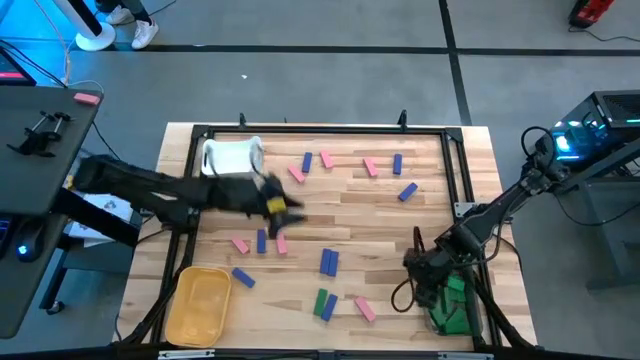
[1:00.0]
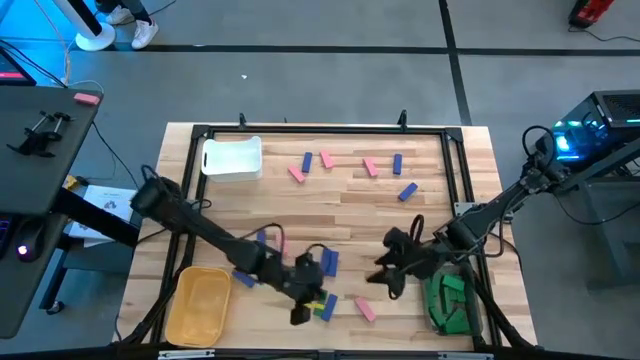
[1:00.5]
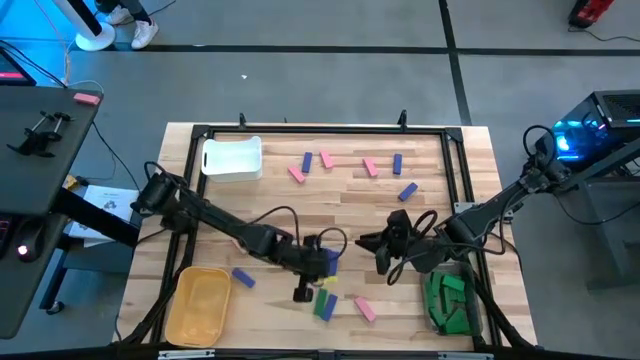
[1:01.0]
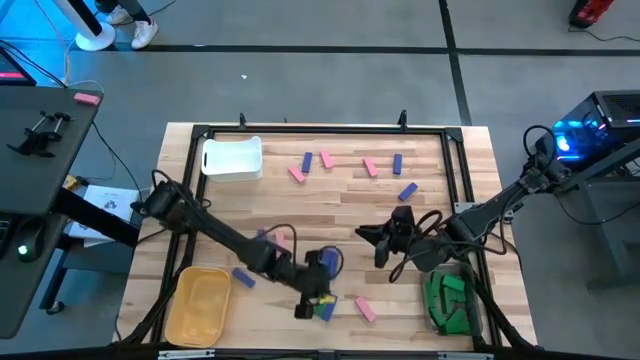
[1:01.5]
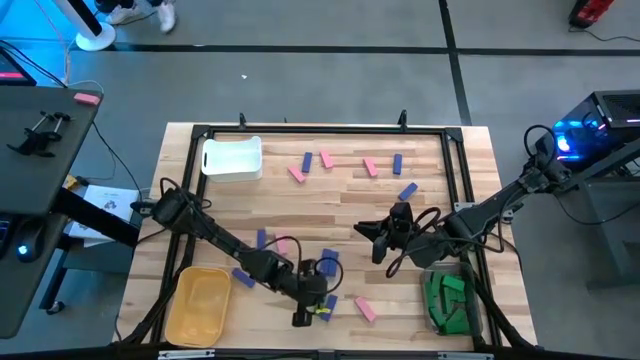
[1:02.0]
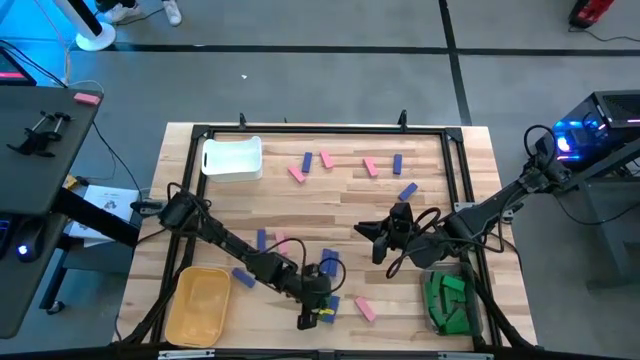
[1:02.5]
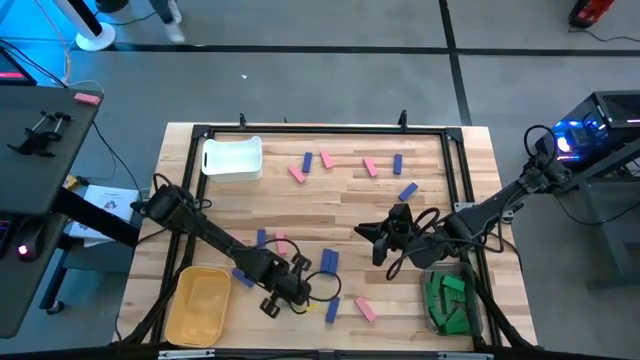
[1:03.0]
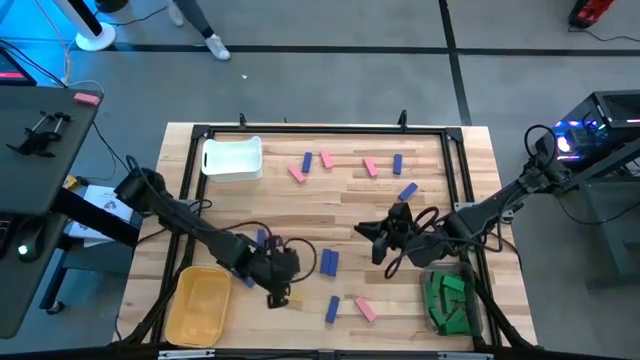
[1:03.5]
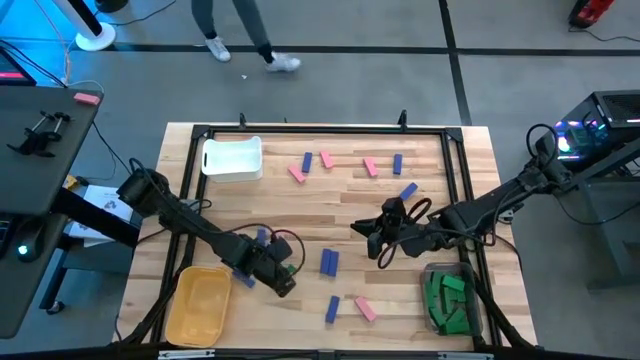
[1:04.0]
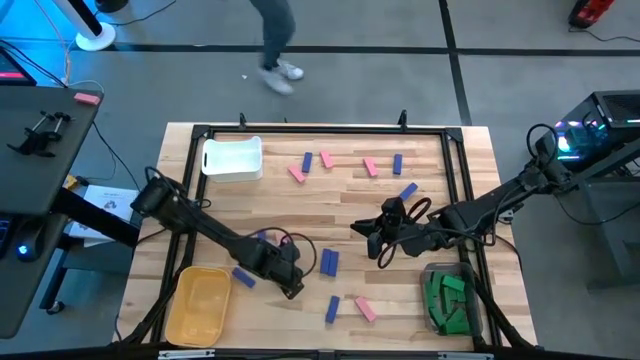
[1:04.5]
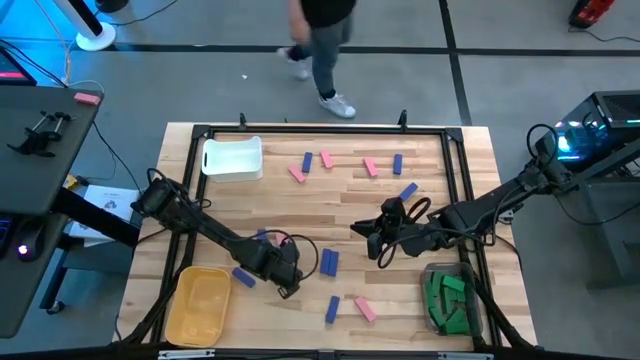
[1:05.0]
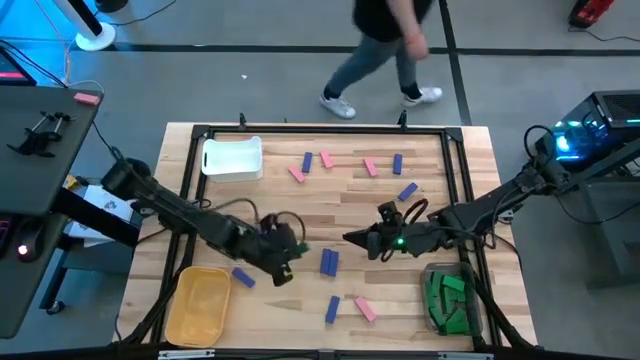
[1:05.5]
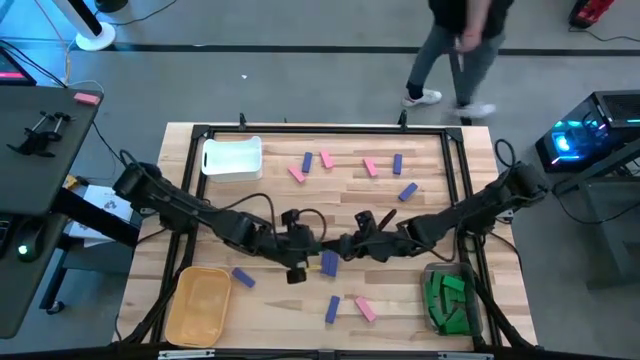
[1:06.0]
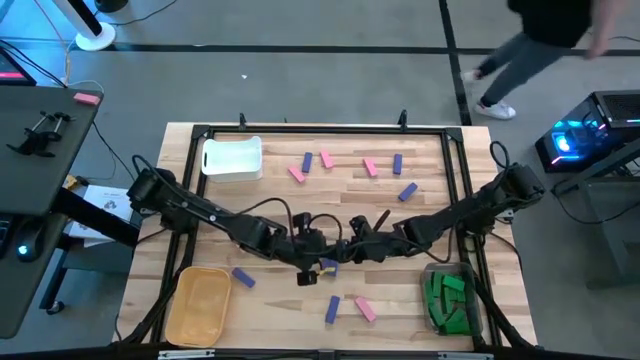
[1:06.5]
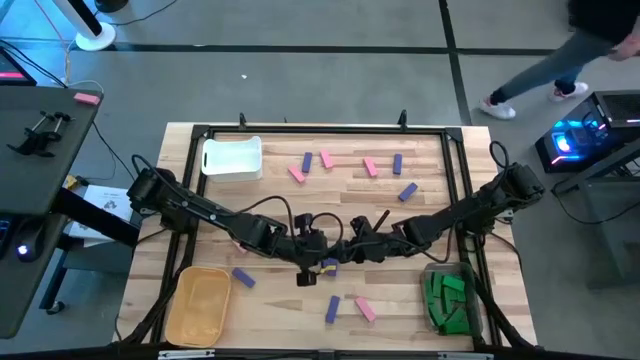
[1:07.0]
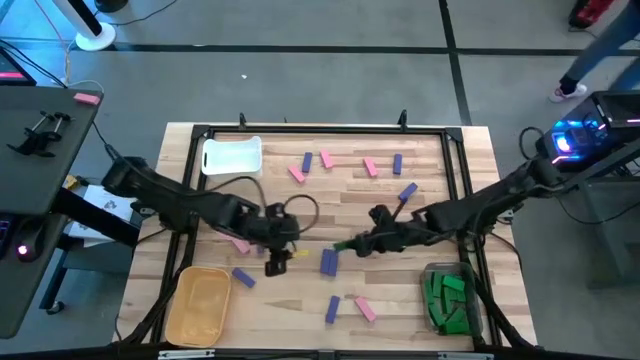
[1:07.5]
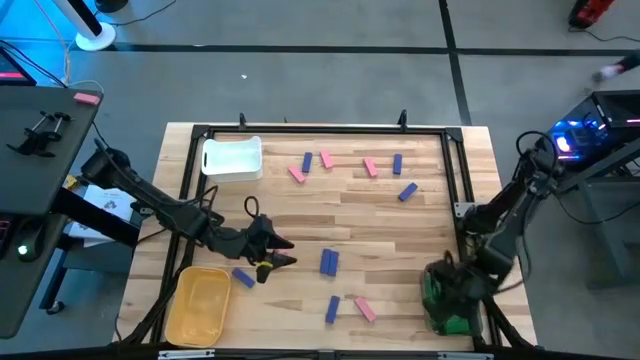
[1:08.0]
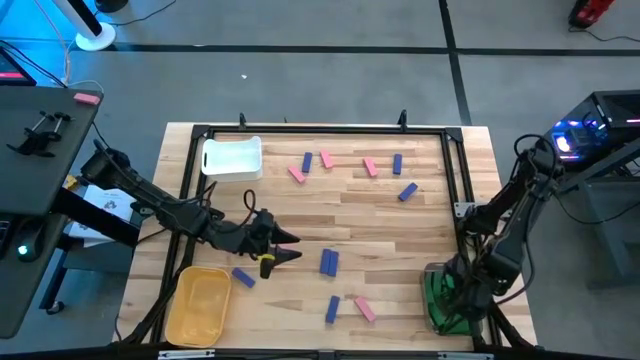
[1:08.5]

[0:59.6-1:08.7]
Task: Sort blocks
Put the blue block into the yellow bin

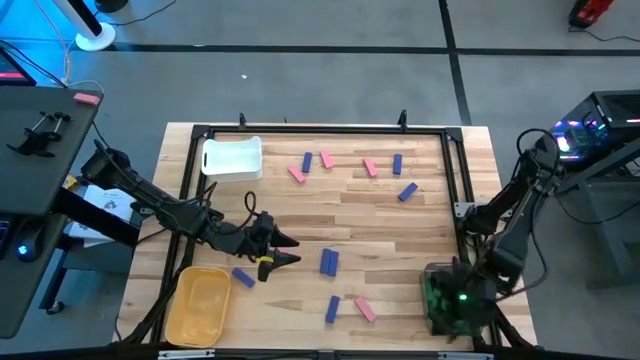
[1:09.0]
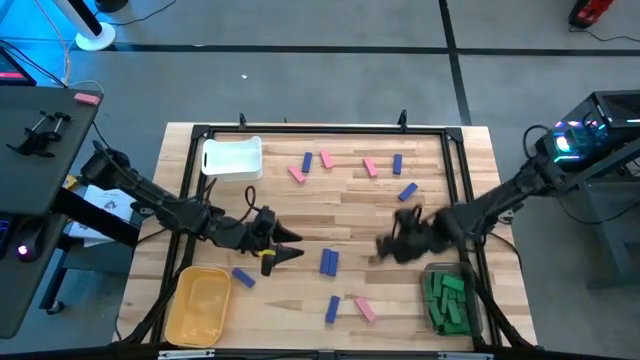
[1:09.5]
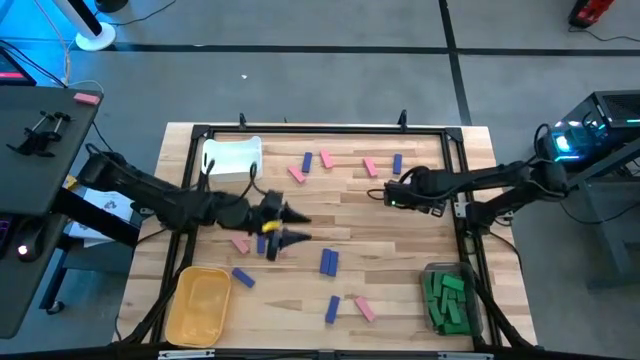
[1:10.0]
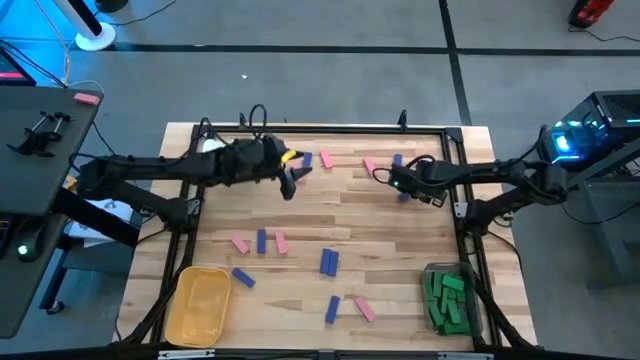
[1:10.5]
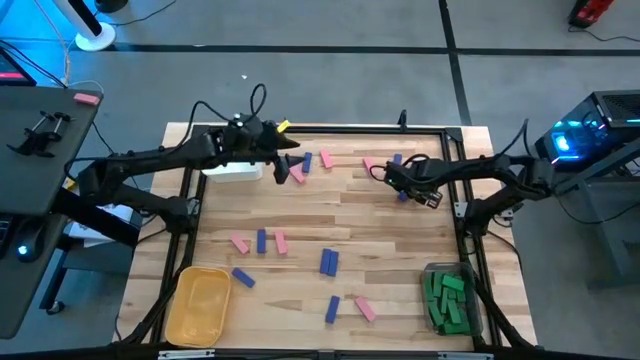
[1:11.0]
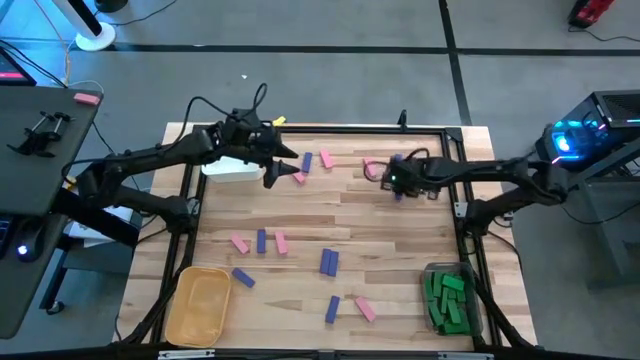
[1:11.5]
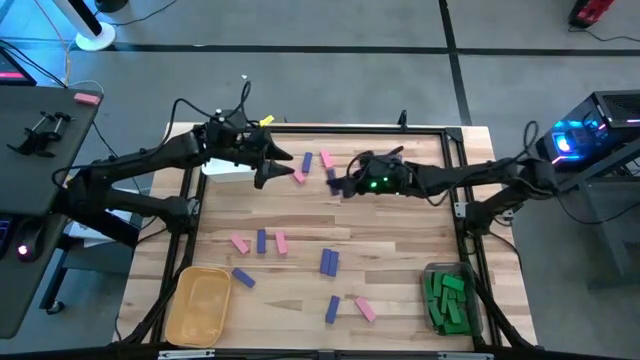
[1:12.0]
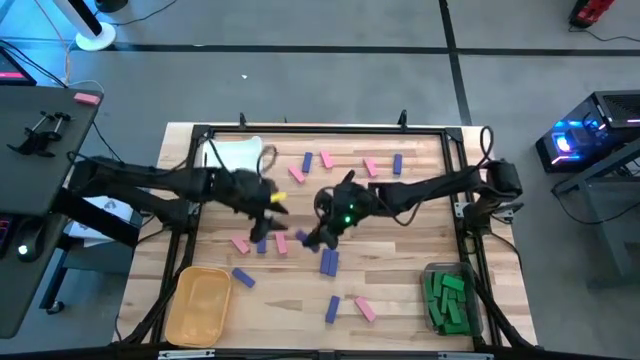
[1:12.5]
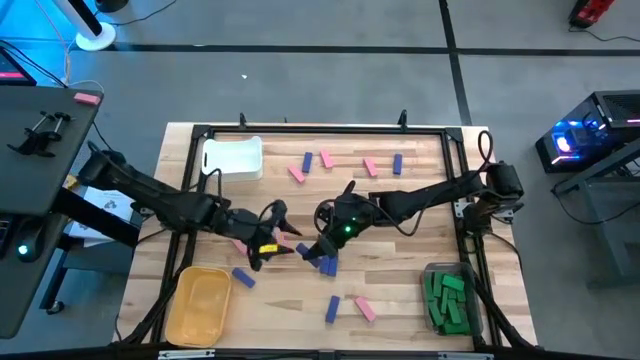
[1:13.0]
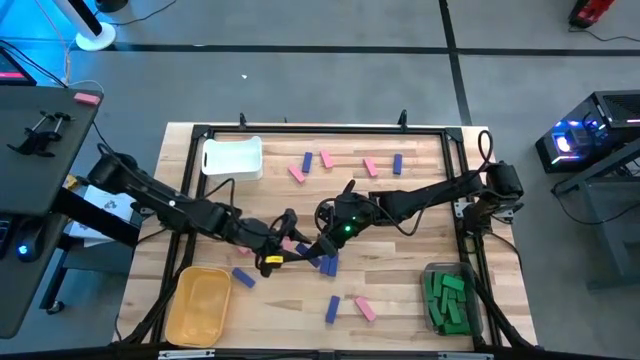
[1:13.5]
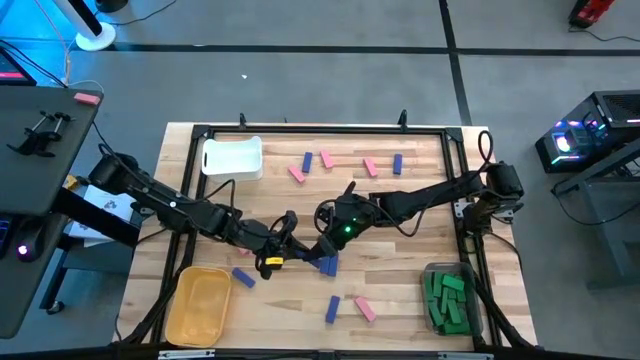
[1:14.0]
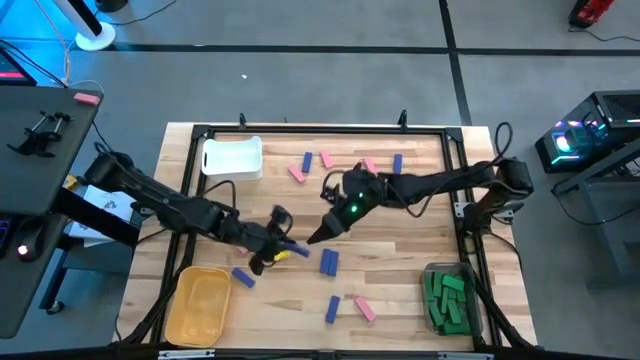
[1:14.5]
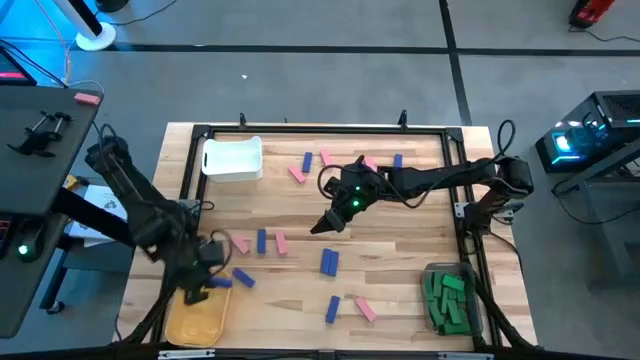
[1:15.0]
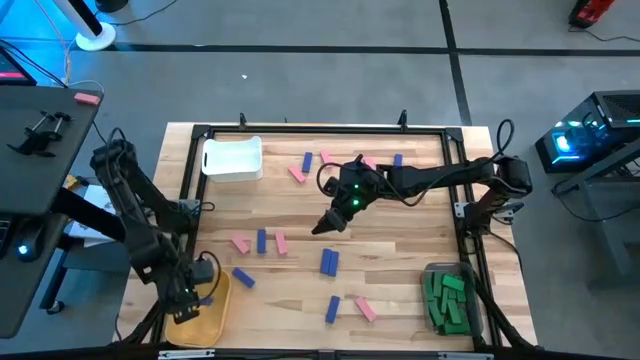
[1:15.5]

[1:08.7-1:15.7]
Put the purple block into the yellow bin

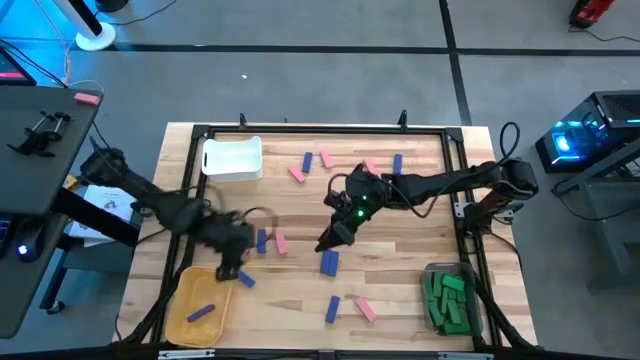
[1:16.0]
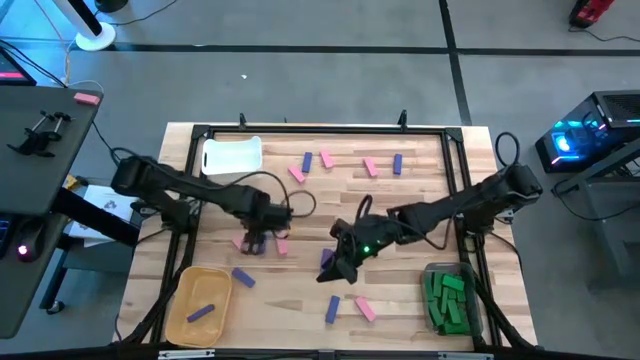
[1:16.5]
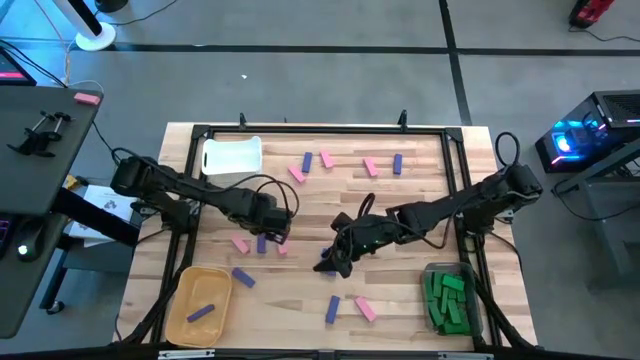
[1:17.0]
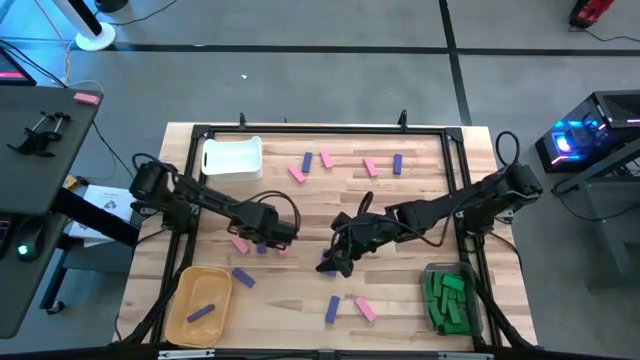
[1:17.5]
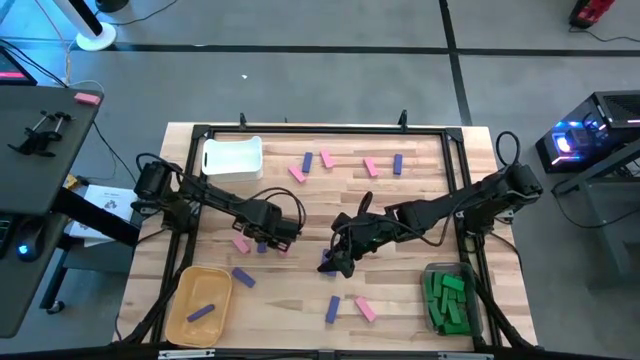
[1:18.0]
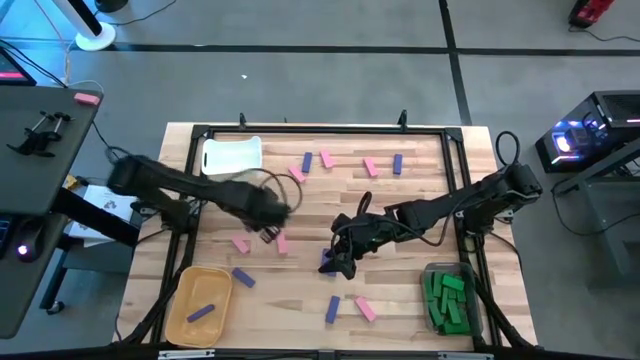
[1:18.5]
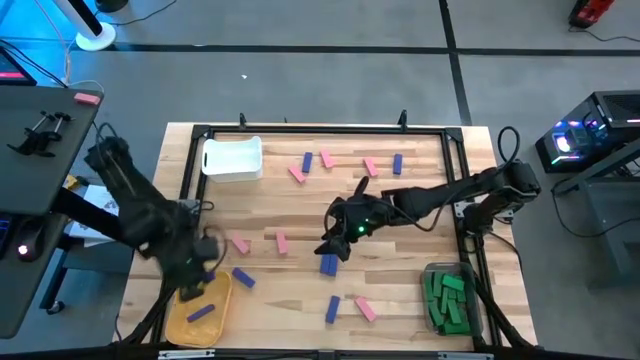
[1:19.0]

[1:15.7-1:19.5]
Put the purple block into the yellow bin

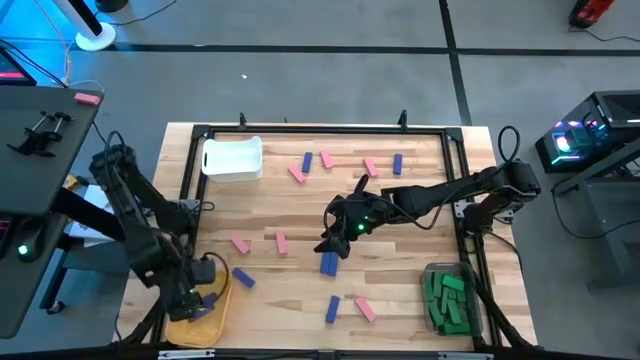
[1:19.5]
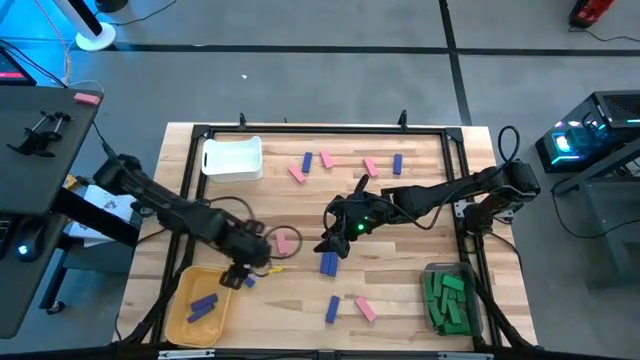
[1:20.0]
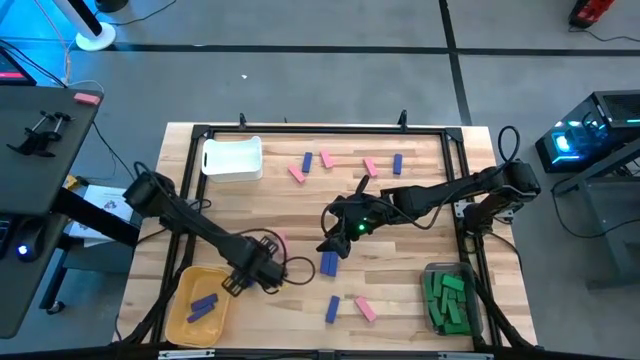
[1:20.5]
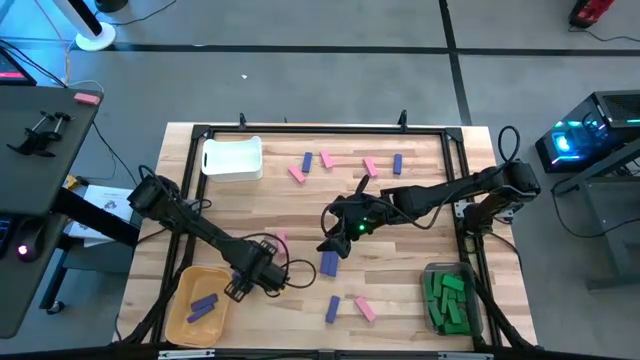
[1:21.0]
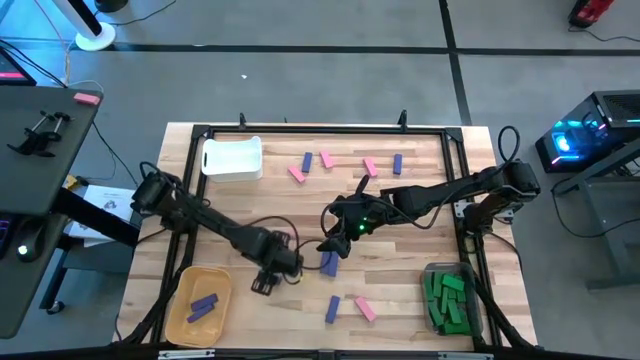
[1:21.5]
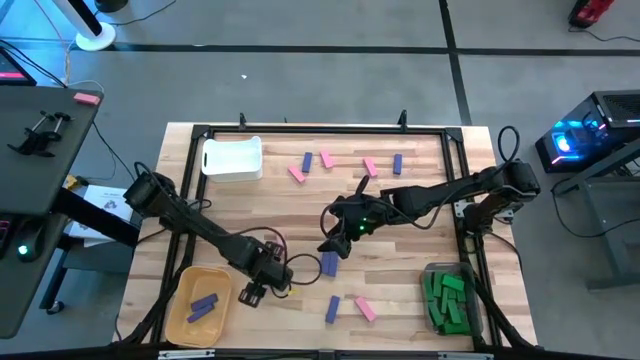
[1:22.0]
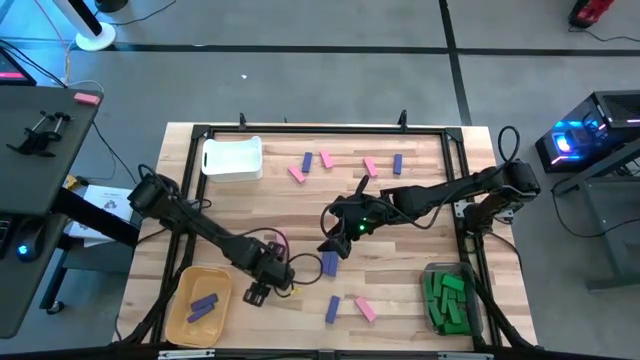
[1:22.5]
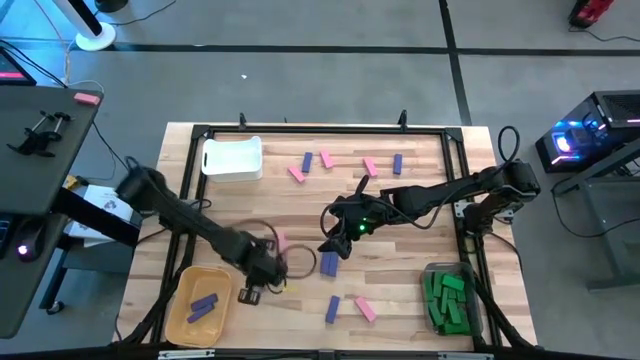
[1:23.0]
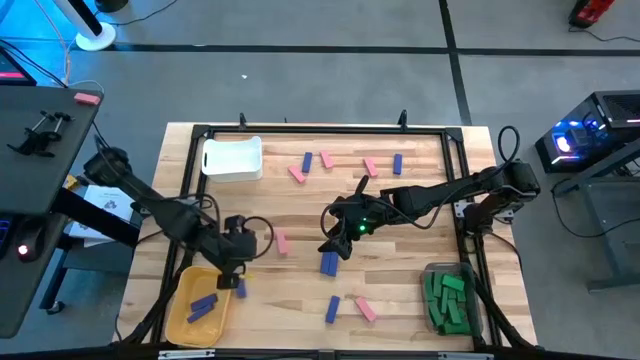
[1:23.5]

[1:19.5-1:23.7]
Put the purple block into the yellow bin
